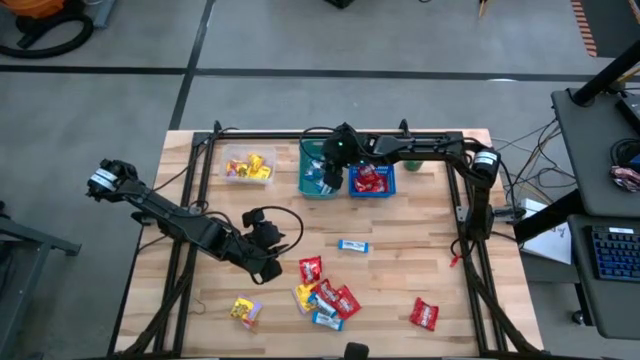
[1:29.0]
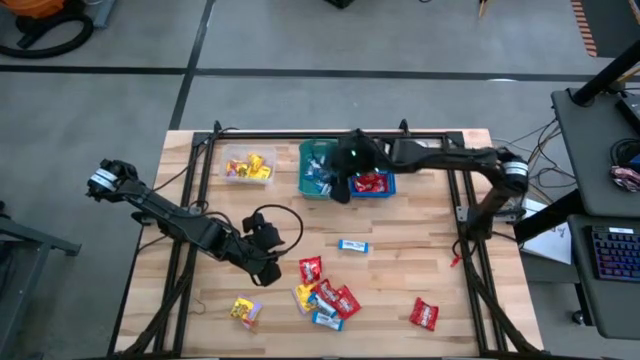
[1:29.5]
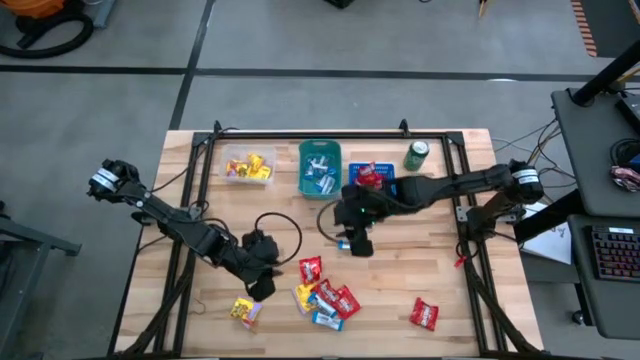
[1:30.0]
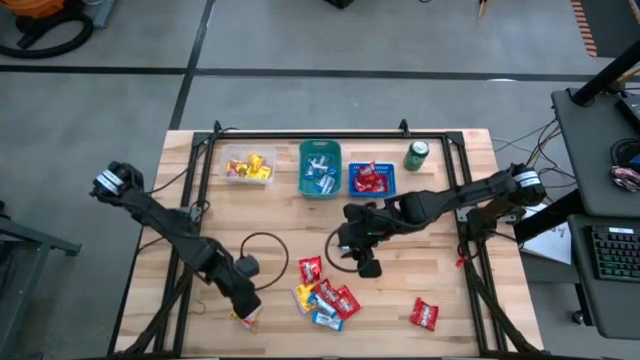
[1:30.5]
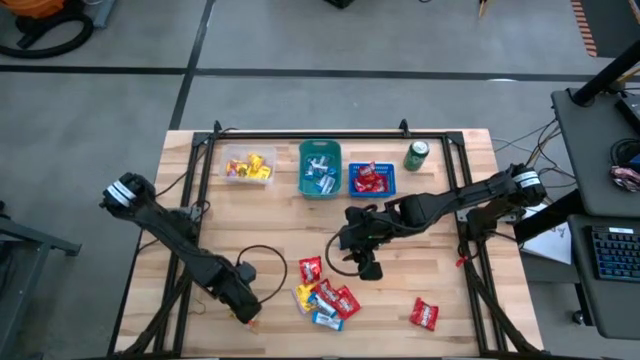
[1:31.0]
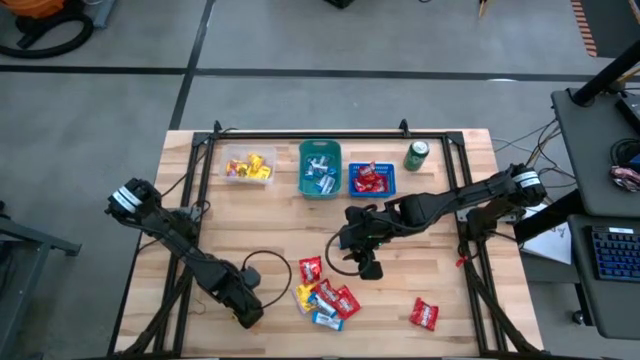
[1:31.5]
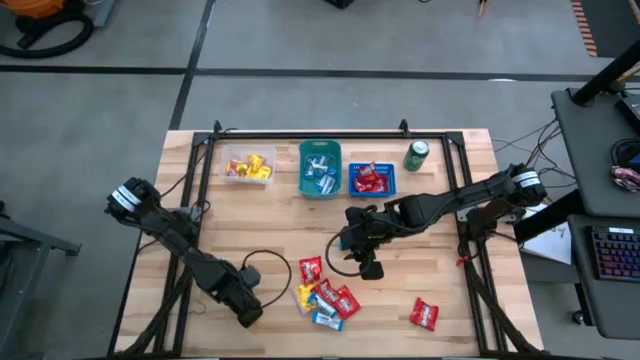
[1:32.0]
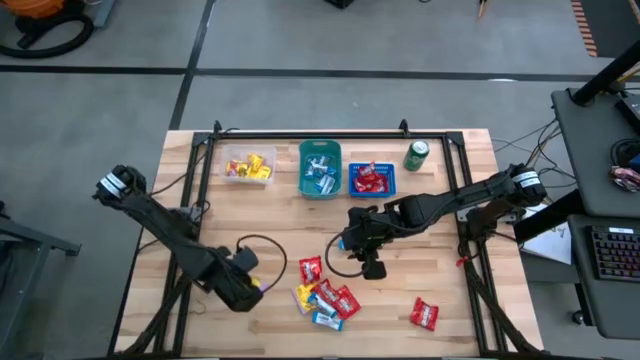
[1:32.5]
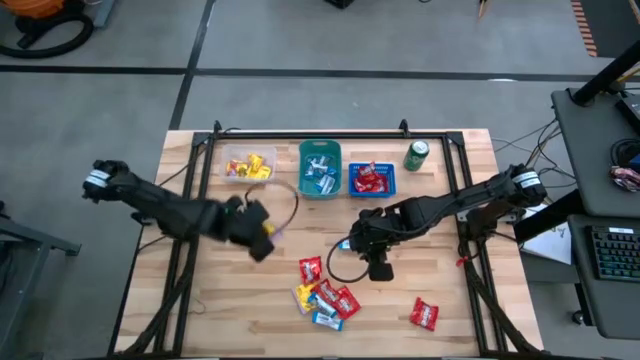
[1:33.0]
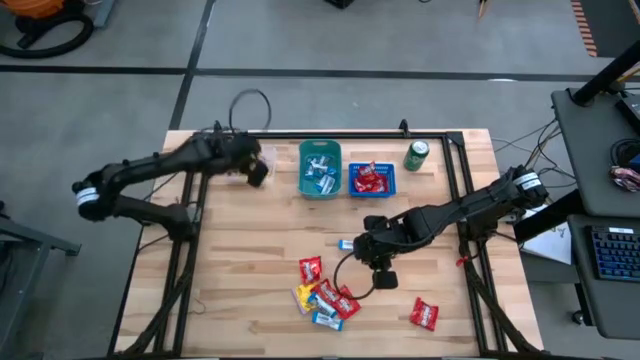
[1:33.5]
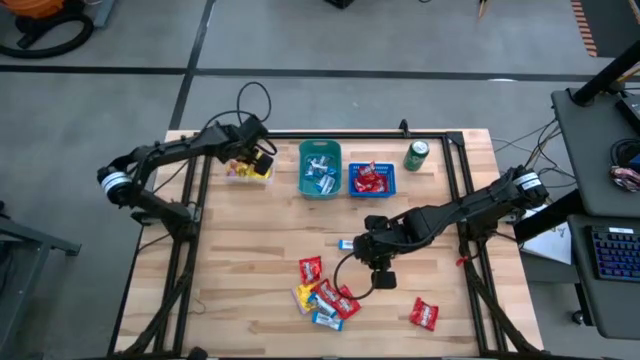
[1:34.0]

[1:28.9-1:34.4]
Task: Sort candy
Put the yellow candy into the transparent bin

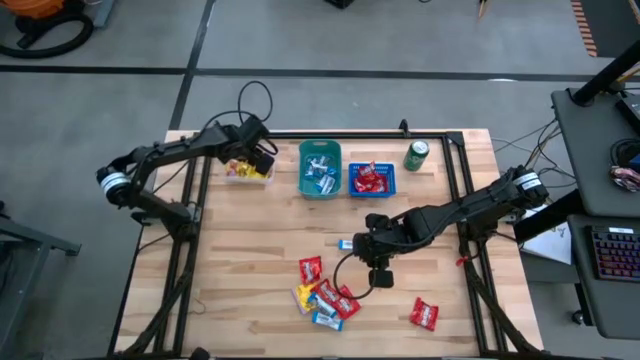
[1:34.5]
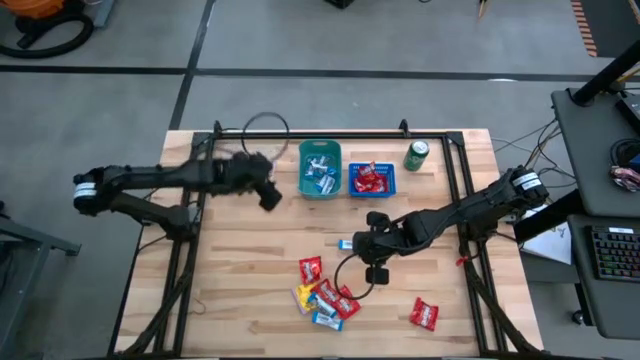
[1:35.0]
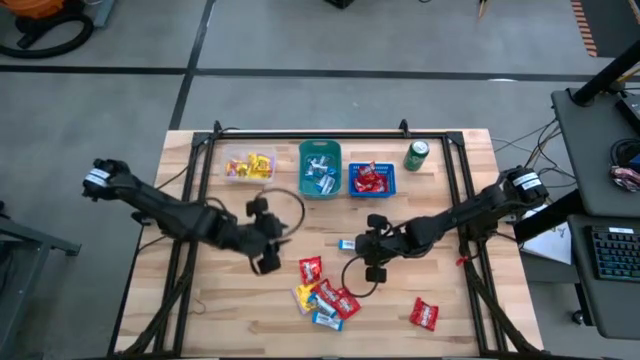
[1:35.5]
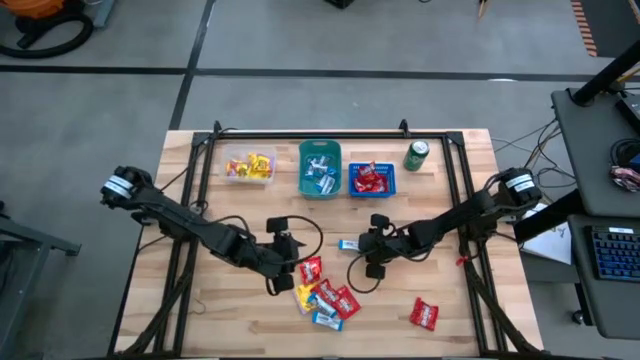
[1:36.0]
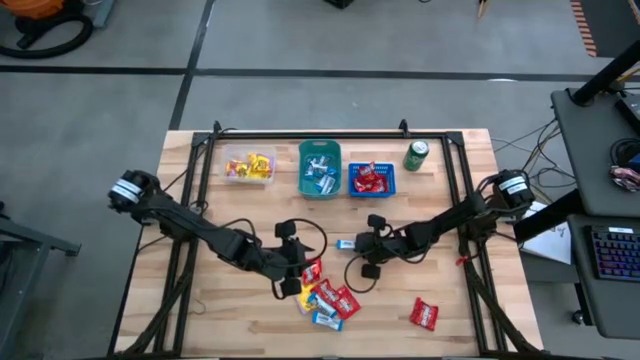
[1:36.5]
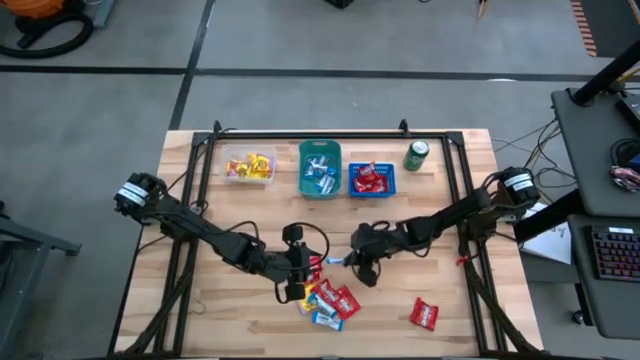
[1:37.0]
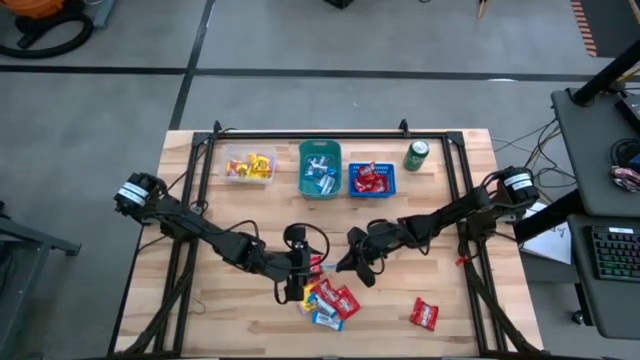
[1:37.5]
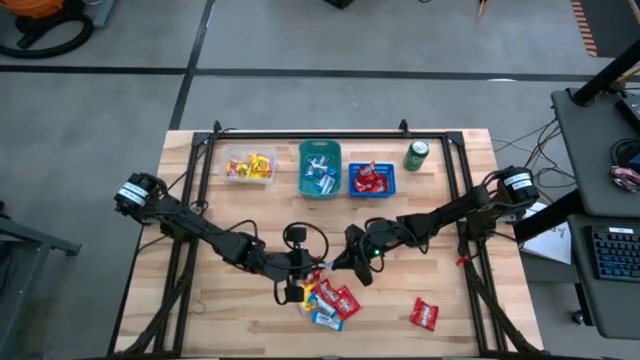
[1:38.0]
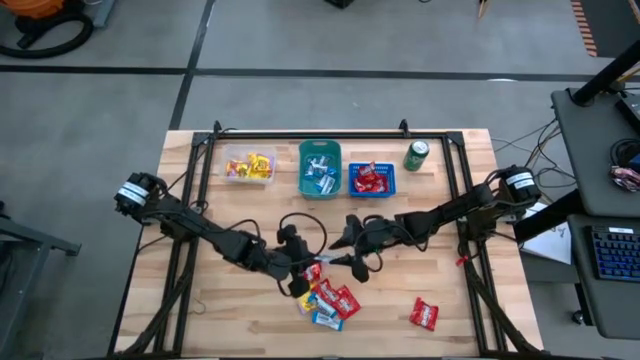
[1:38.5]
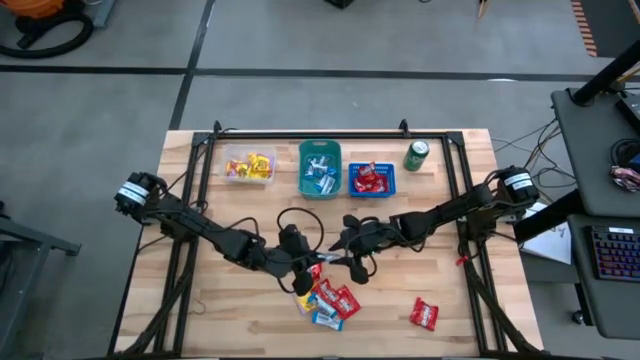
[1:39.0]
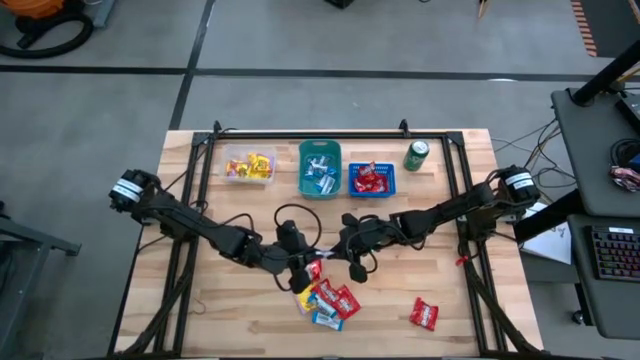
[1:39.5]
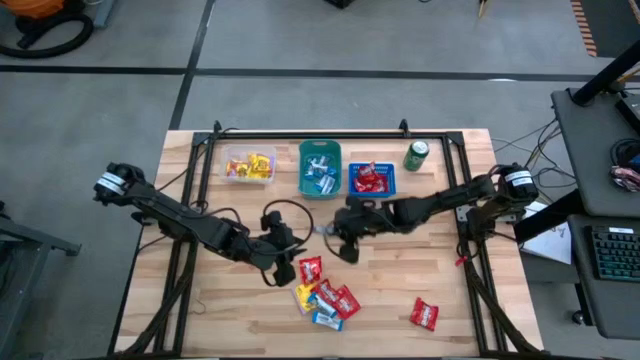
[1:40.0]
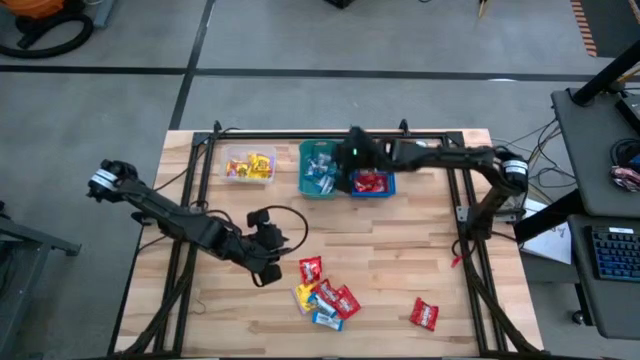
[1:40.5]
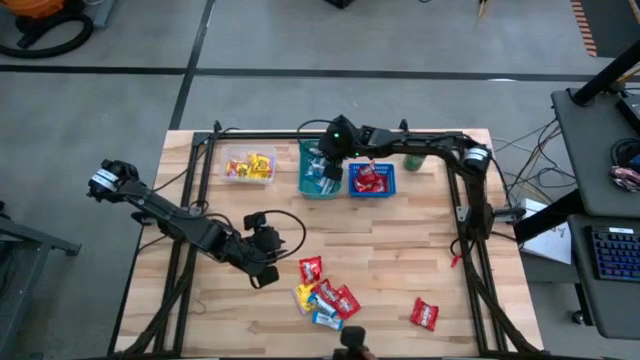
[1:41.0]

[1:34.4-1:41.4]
Put the white chocolate into the green bin

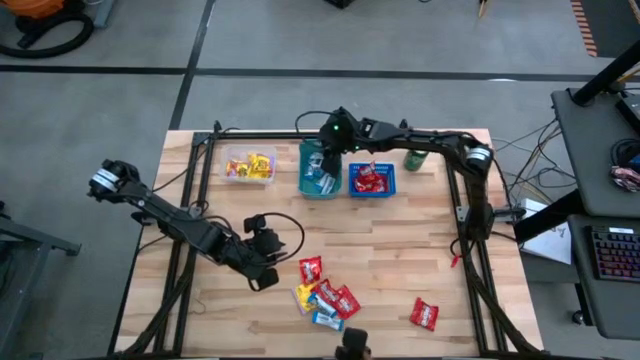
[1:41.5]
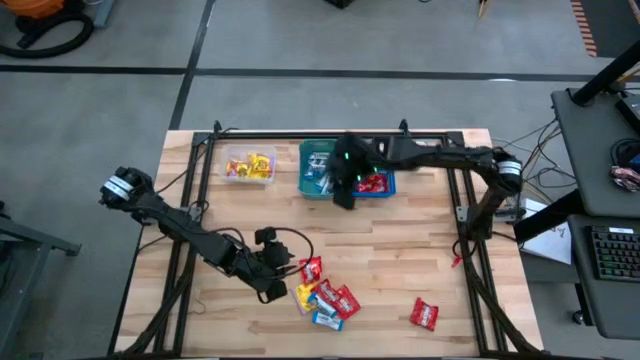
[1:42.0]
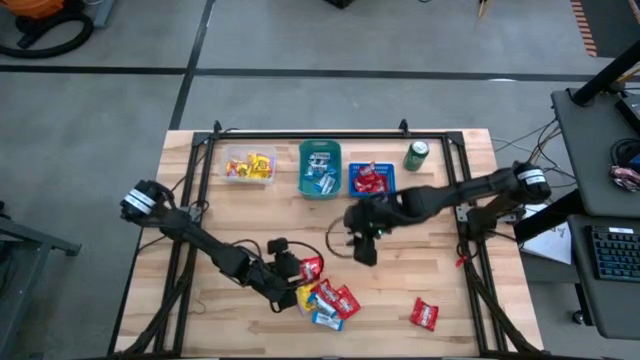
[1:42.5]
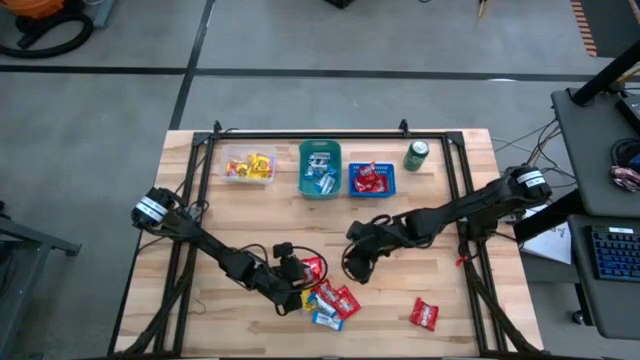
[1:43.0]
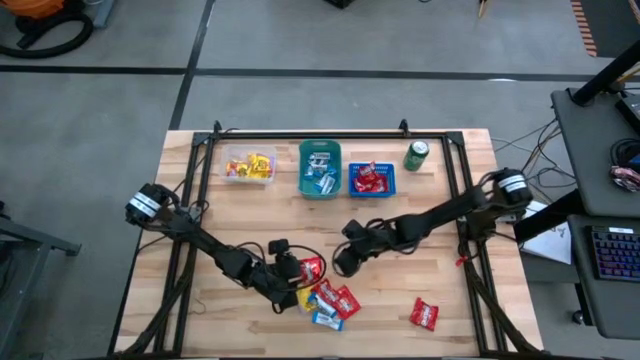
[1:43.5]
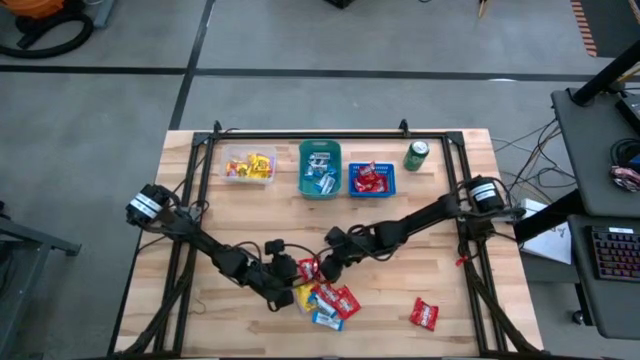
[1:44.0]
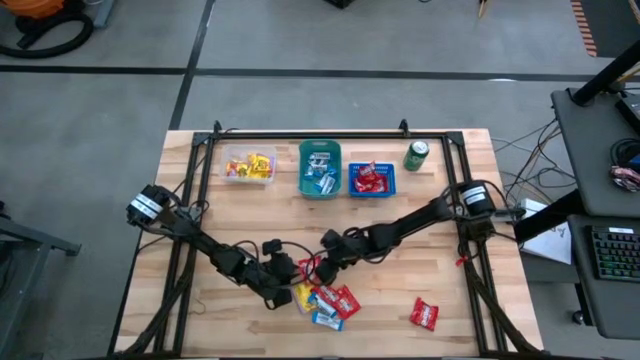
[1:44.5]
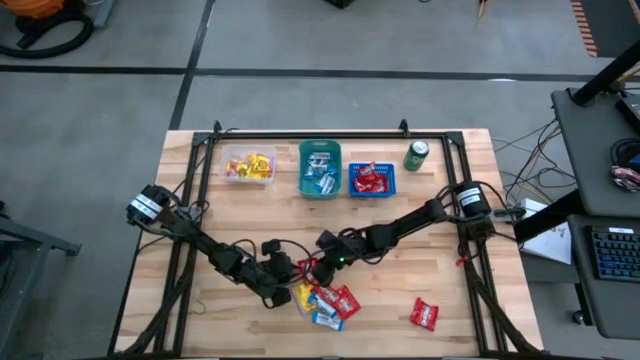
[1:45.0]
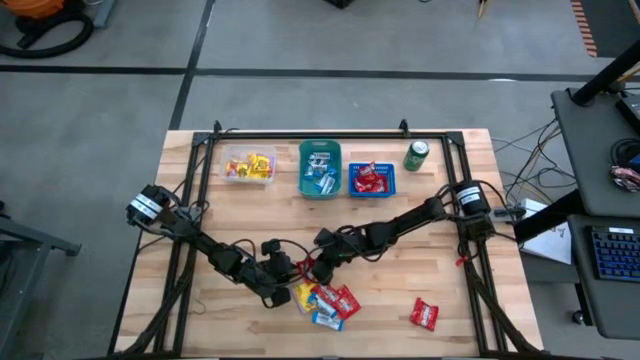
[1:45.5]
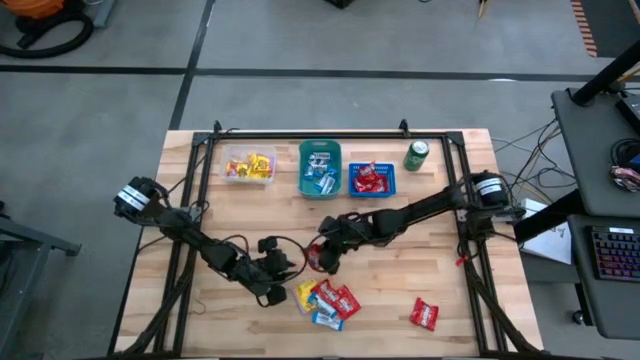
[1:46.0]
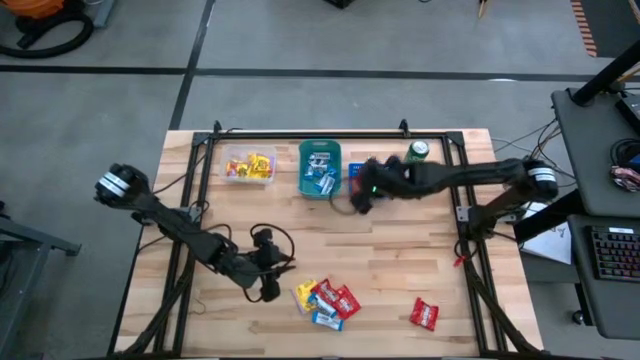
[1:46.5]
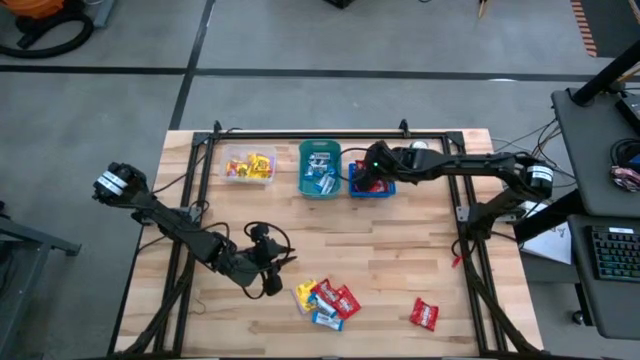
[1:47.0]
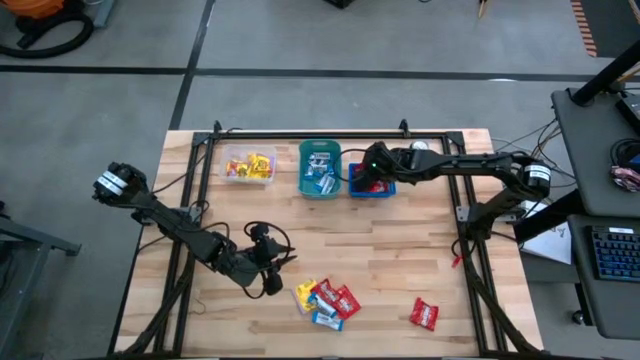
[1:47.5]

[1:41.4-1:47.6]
Put the red candy into the blue bin

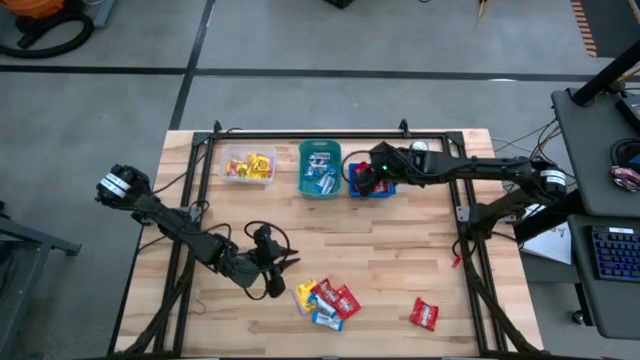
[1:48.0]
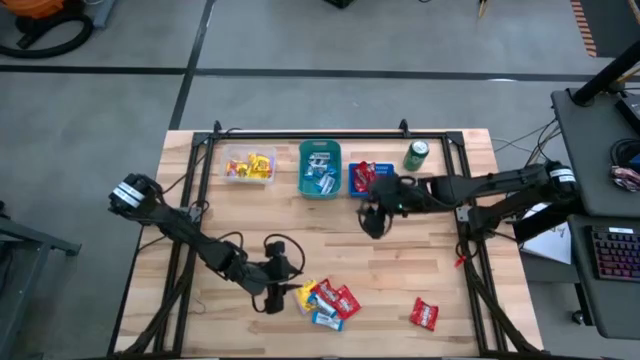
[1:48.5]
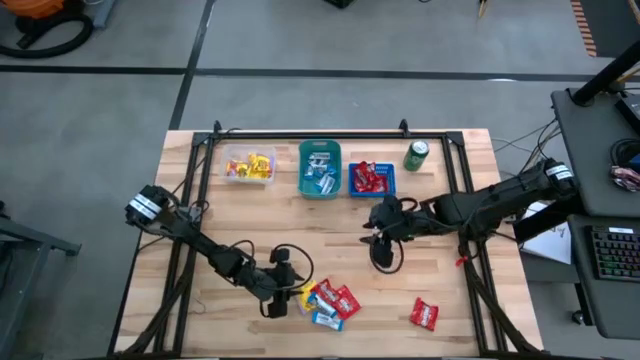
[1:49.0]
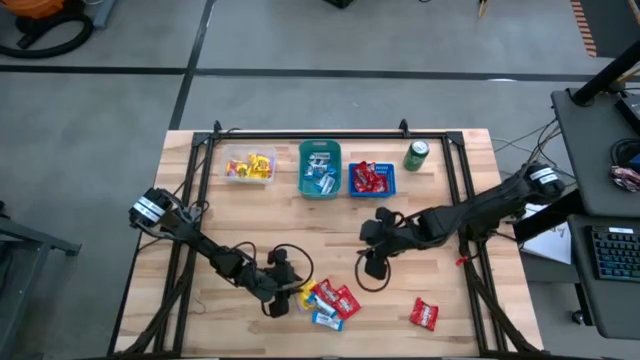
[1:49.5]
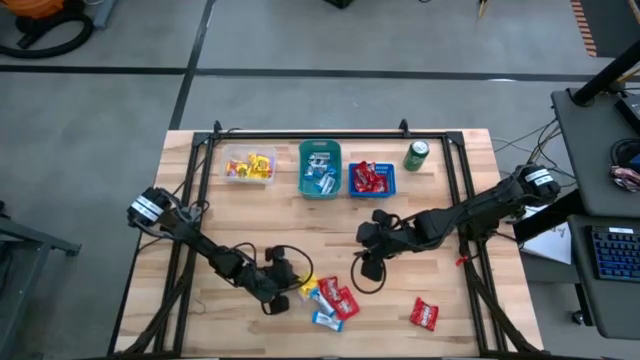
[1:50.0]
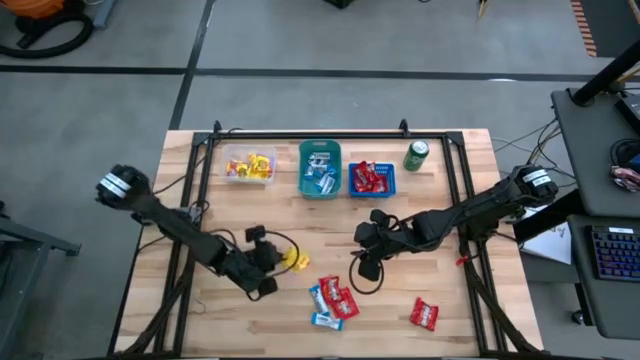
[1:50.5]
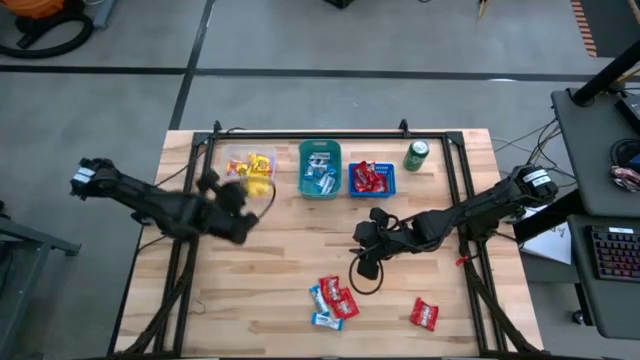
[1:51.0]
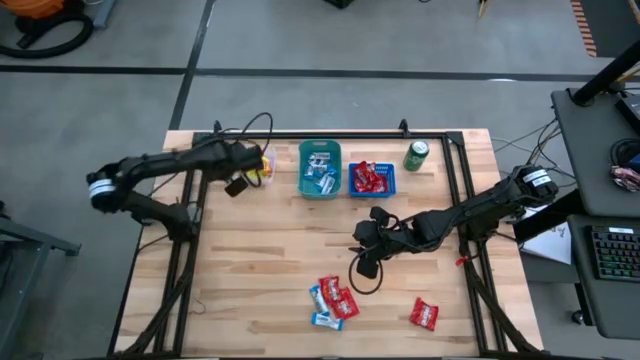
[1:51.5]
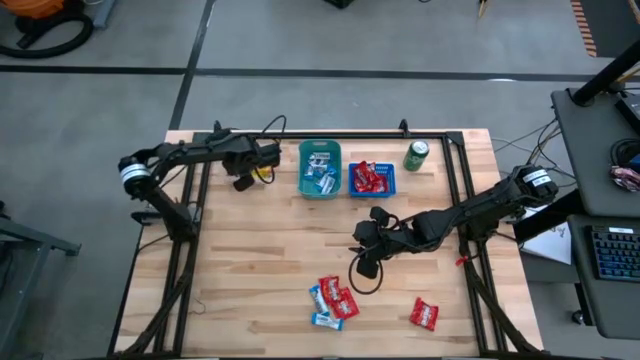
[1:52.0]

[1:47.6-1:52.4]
Put the yellow candy into the transparent bin
